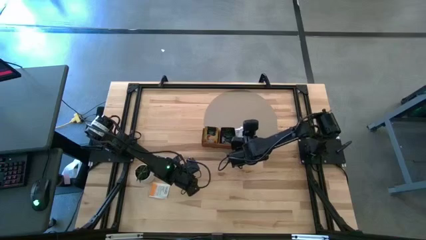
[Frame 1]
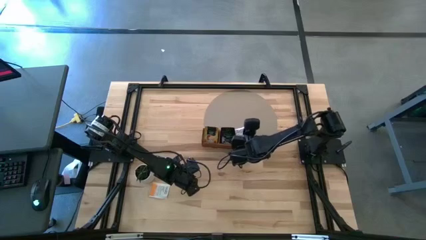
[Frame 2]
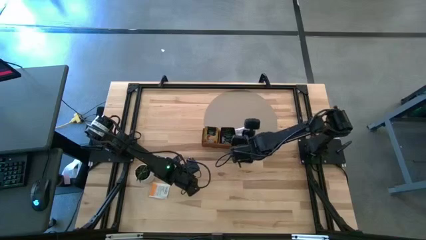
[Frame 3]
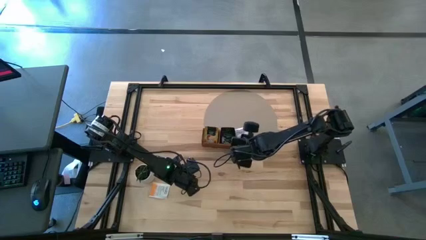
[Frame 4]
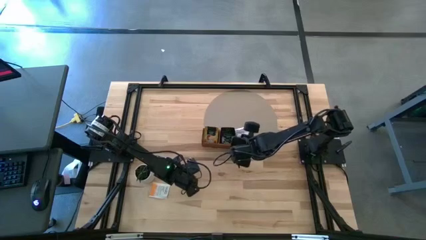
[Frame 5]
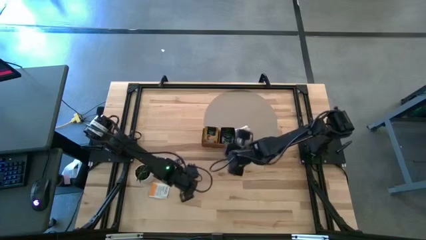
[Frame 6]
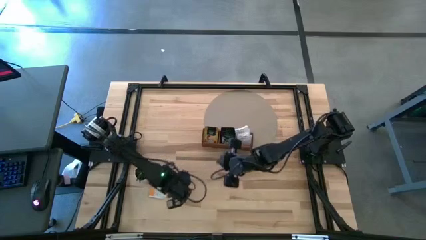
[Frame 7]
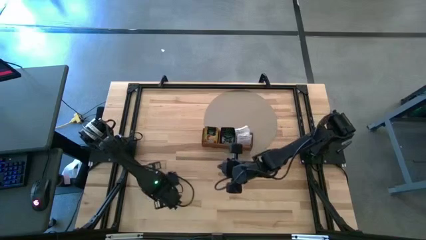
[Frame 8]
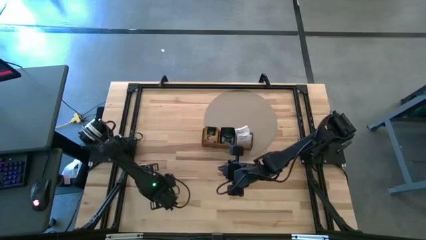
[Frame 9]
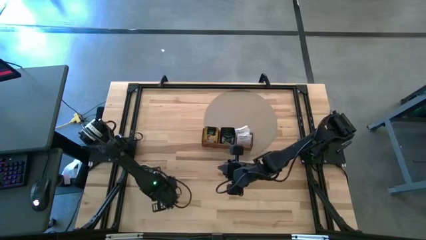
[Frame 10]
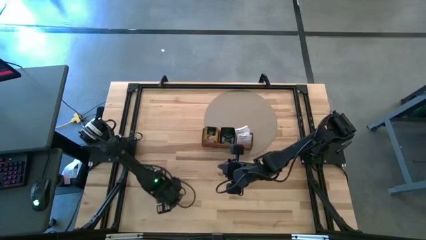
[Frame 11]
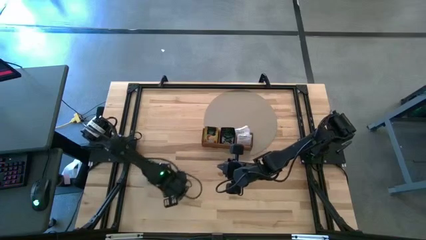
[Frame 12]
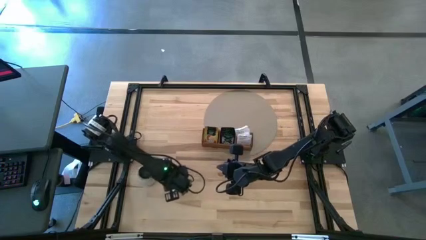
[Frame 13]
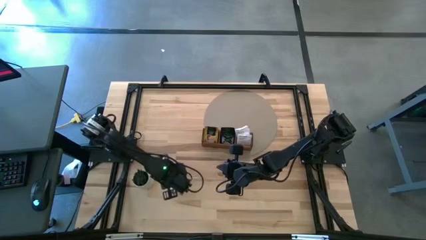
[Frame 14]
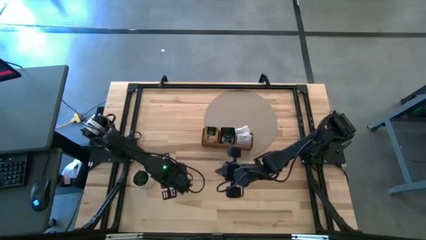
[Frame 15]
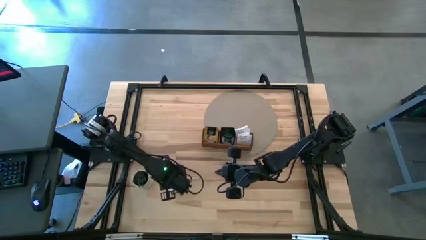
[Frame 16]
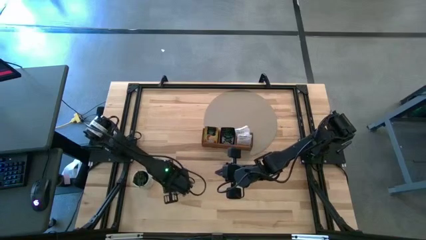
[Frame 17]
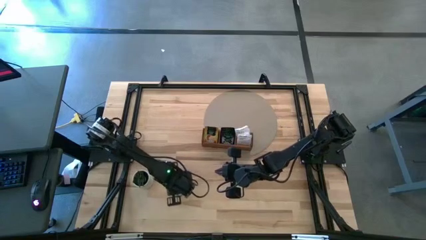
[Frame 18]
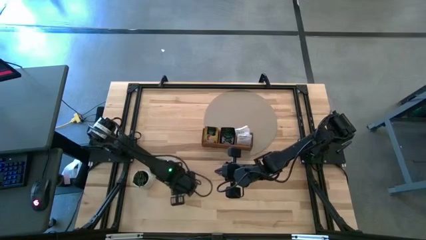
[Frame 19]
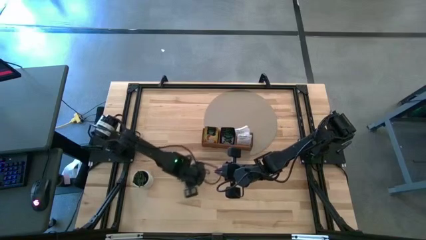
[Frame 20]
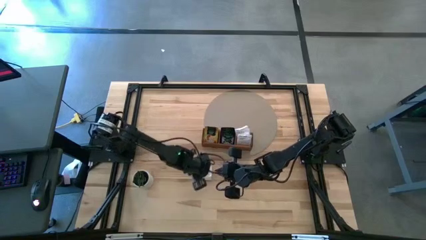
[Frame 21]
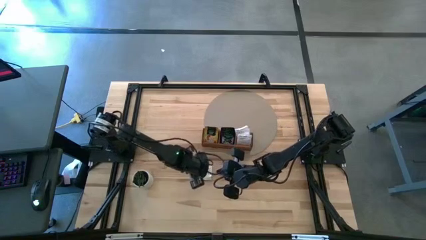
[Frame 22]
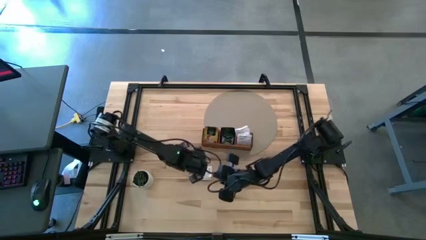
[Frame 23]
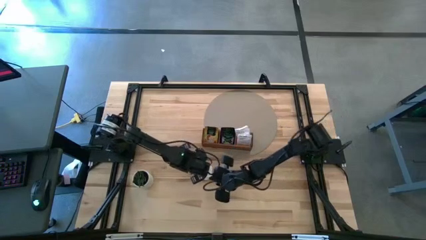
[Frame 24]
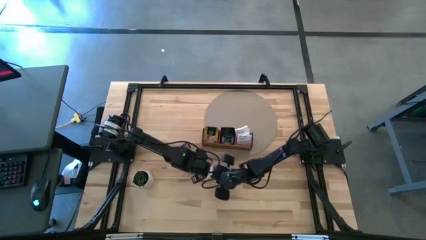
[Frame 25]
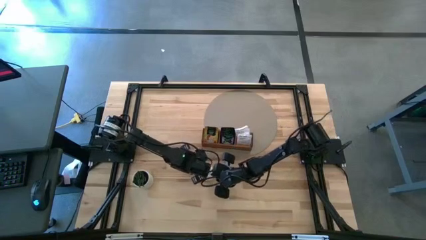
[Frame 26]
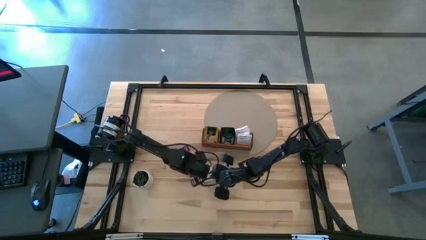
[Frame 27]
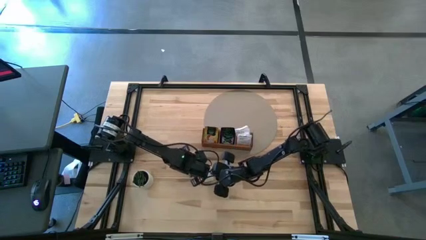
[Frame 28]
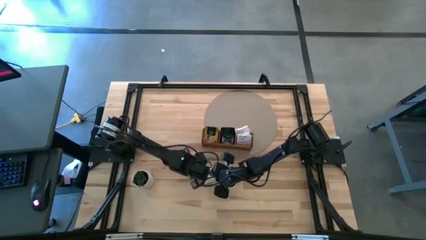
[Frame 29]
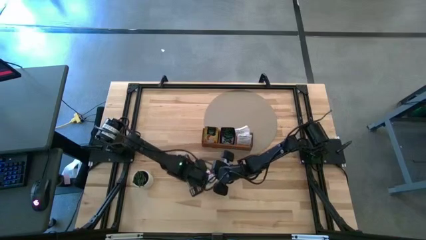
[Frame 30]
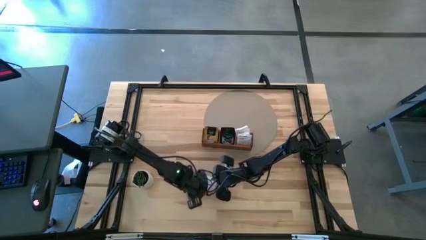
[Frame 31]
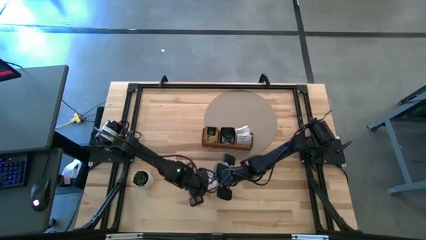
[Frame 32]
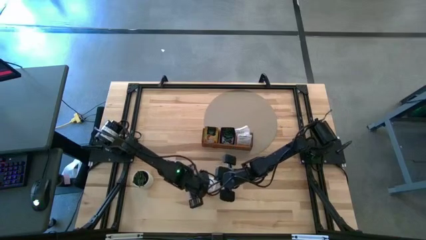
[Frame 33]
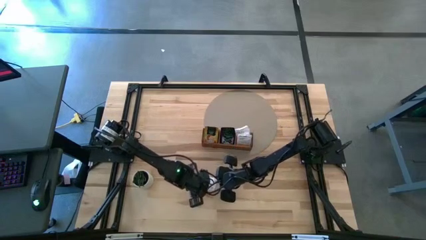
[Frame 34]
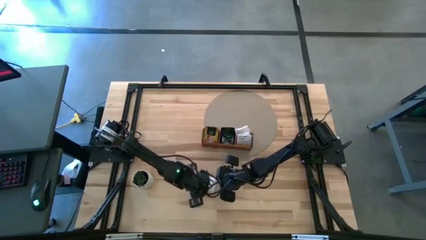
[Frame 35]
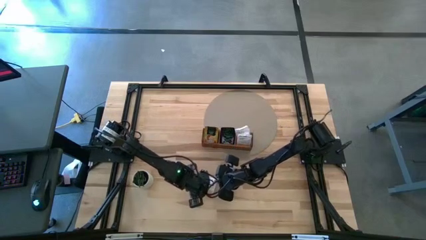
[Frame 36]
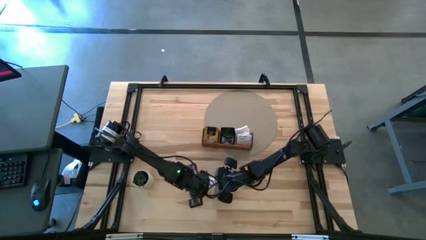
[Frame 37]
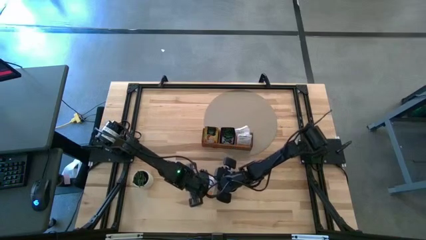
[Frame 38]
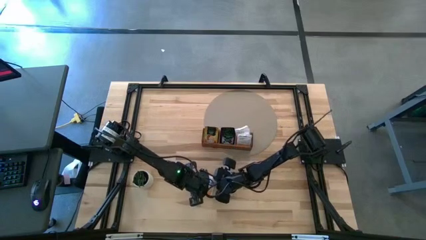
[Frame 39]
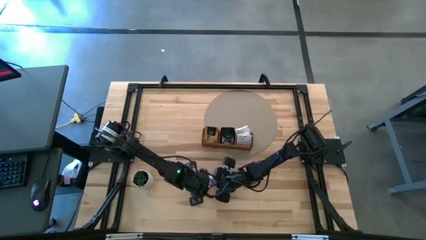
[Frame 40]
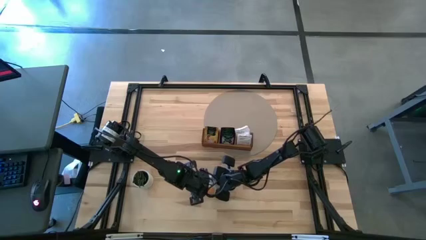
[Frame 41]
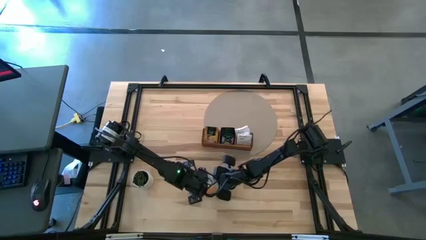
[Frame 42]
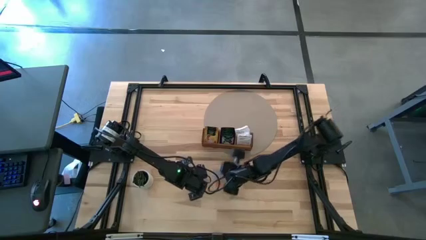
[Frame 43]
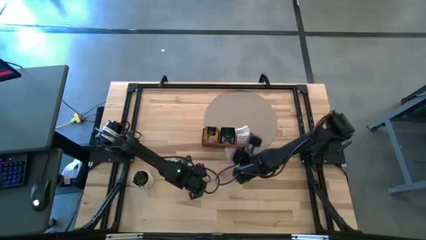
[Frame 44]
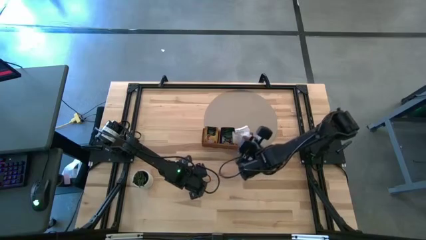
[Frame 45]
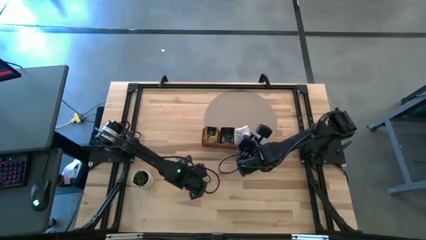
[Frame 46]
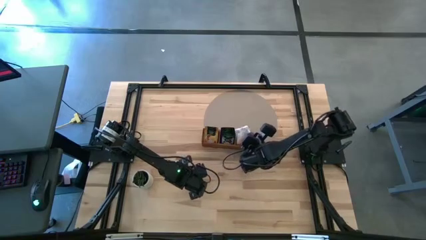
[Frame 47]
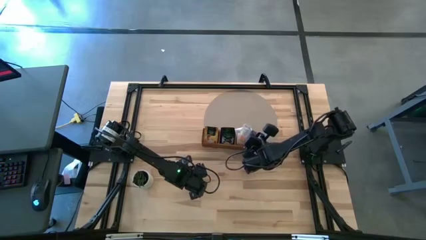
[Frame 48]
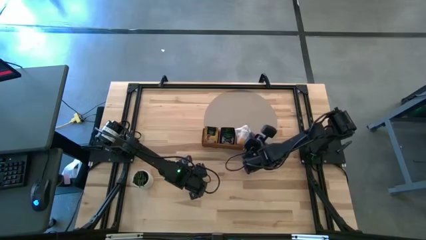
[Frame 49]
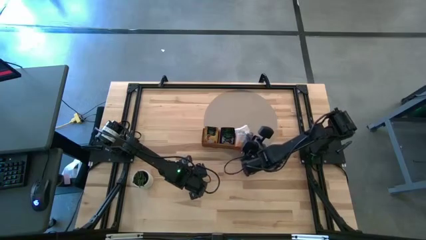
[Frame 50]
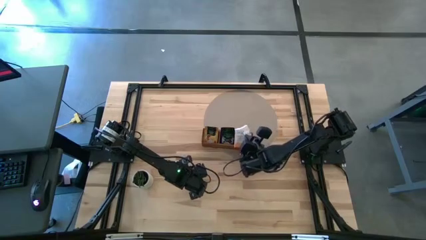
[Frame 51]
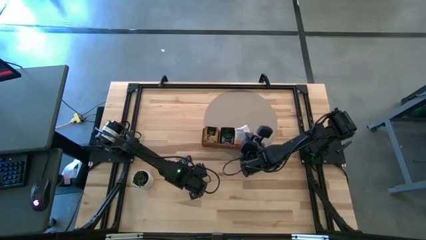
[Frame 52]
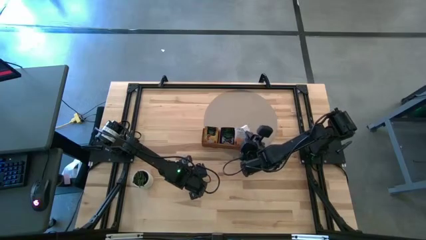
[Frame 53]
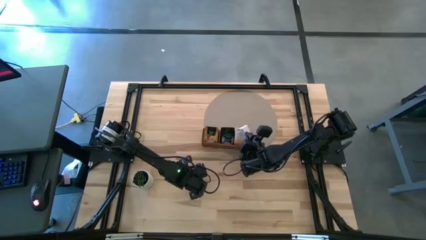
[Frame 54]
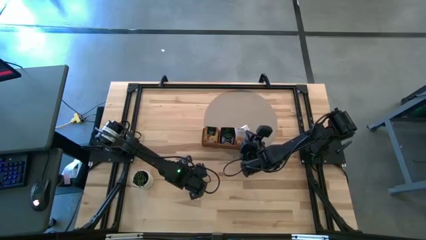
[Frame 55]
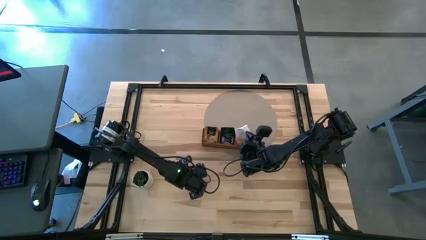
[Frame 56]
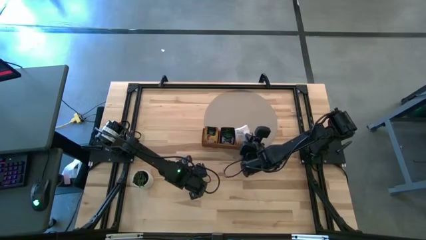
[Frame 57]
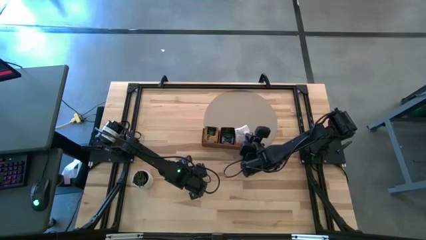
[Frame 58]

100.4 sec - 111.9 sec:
Task: Pick & Place Tea
Put the white tea bag into the right section of the wooden organizer

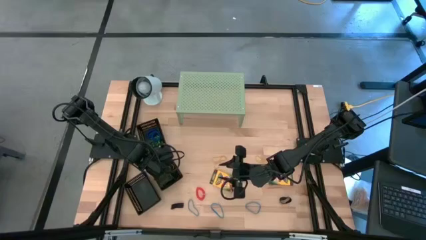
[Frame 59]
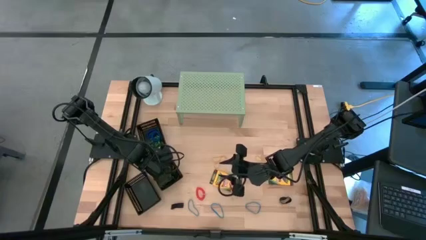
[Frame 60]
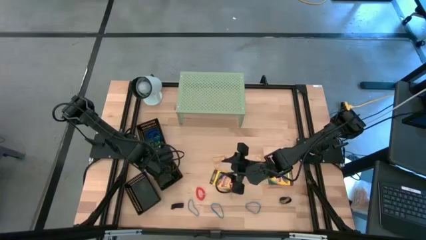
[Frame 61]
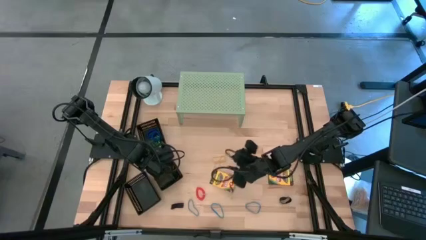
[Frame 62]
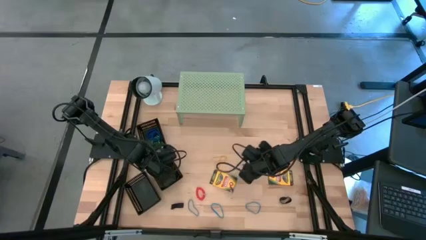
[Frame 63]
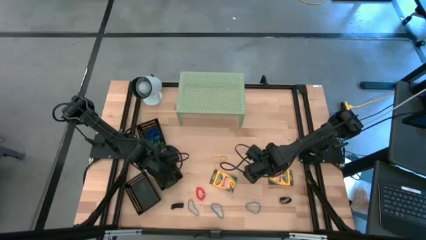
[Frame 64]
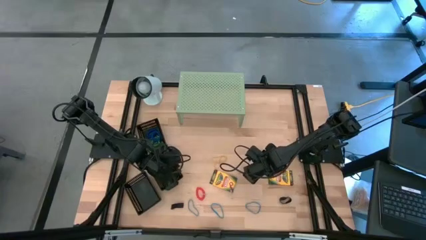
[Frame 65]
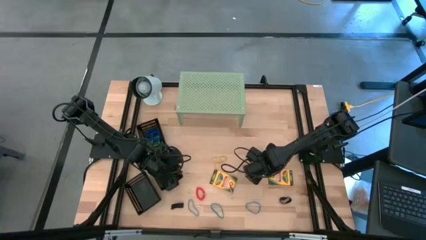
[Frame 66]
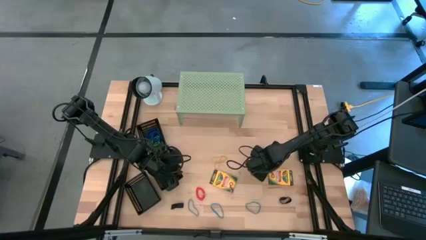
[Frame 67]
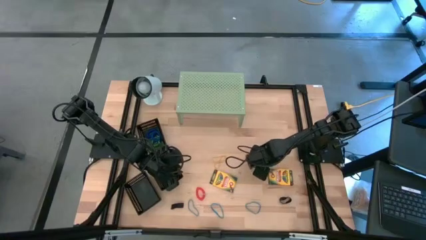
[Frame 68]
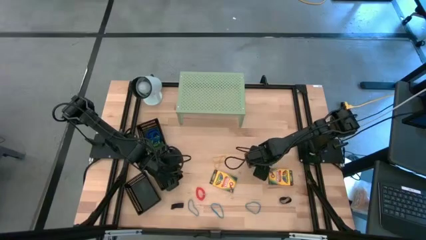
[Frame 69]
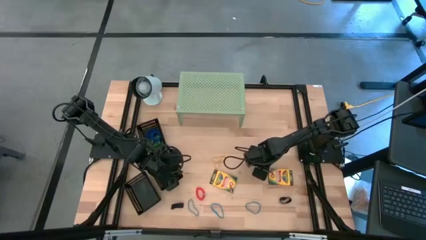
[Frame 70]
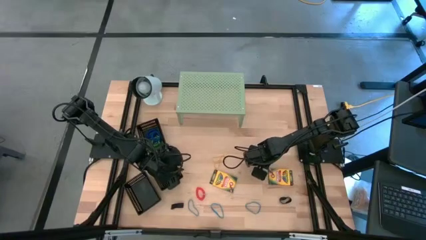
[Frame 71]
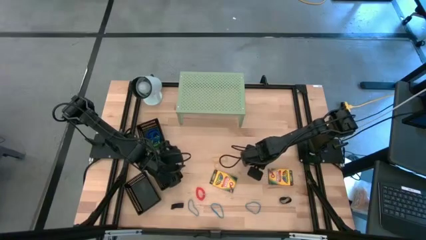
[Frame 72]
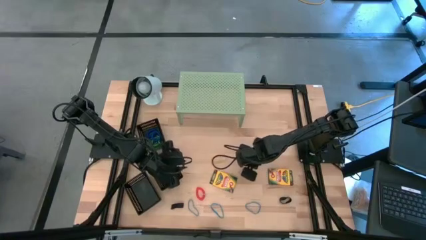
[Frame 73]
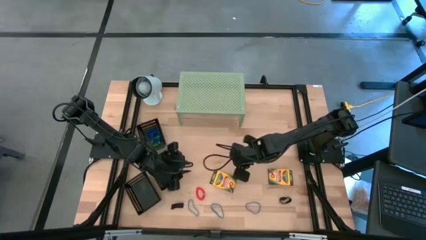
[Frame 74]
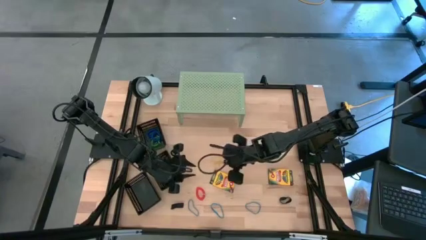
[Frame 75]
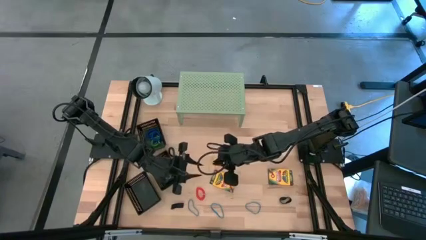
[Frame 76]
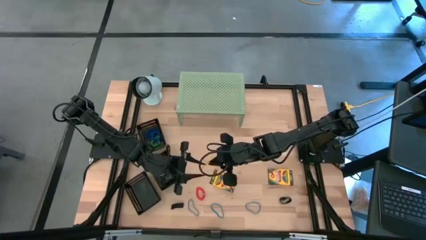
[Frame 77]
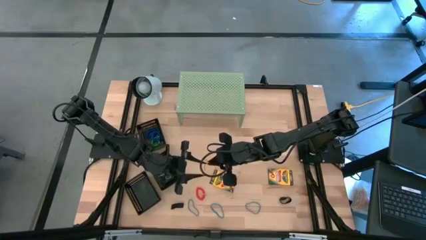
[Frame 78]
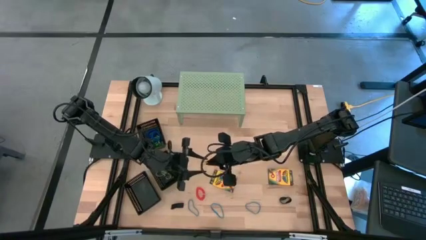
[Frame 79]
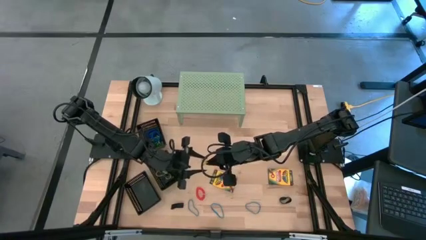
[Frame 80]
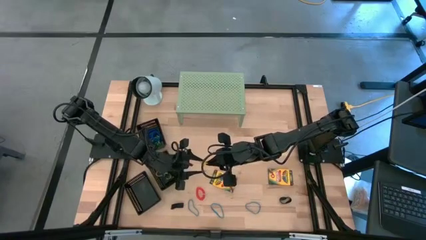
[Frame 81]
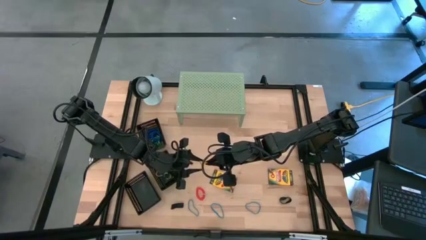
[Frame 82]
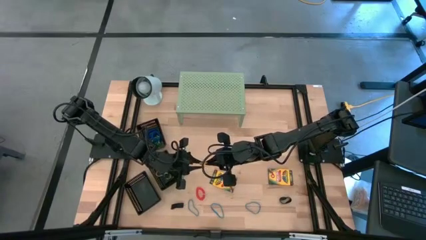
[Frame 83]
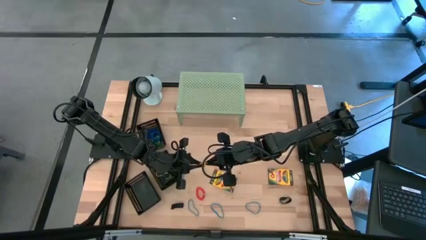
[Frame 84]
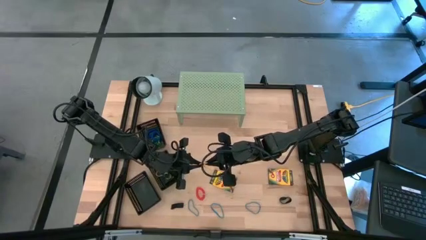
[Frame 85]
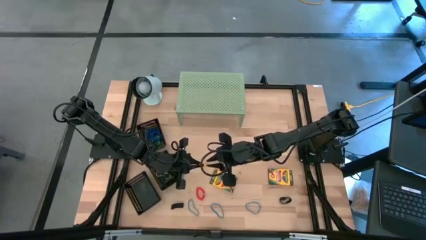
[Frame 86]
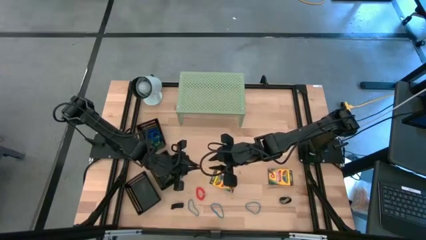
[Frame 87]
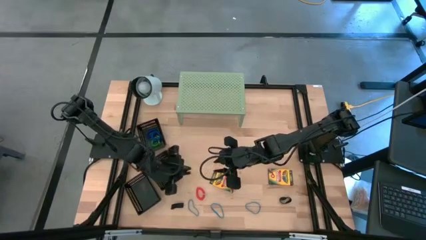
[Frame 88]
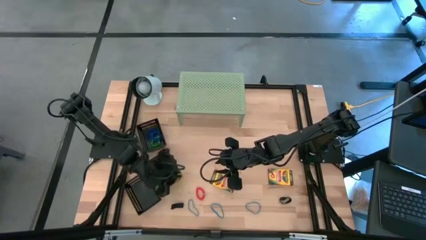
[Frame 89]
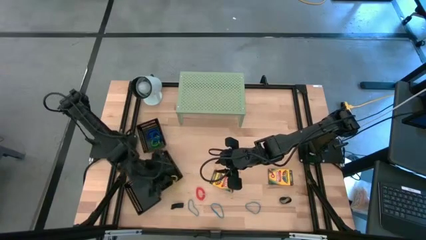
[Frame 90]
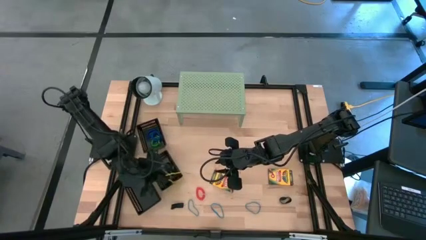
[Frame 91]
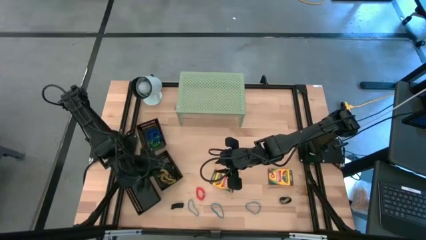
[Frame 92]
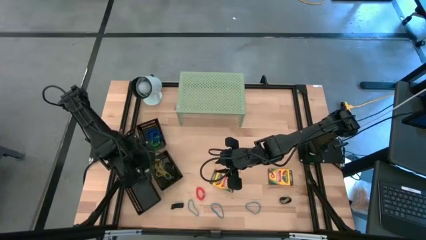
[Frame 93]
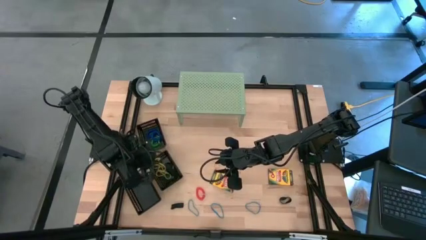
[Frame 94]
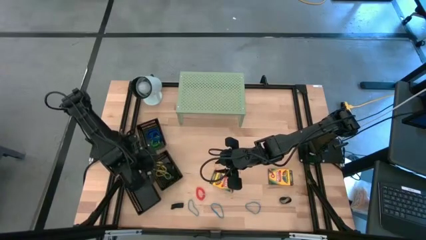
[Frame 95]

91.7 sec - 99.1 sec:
Task: Pick & Place Office Desk Supplies
Put the yellow rubber band into the middle black bin
